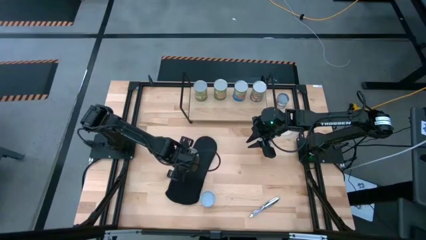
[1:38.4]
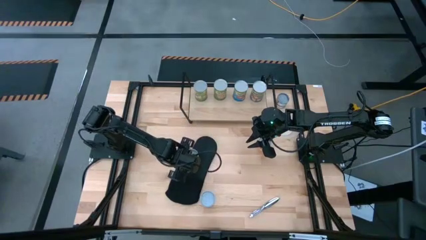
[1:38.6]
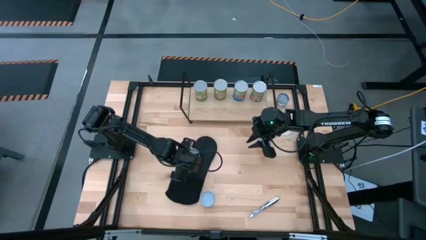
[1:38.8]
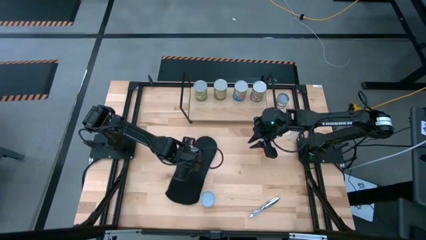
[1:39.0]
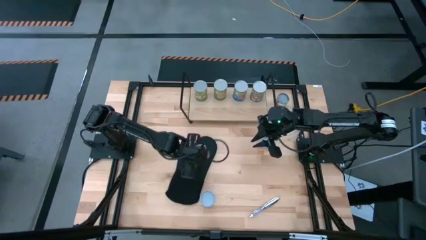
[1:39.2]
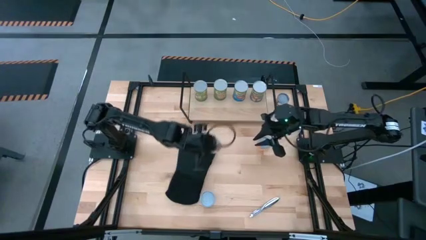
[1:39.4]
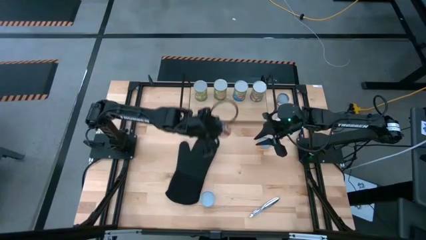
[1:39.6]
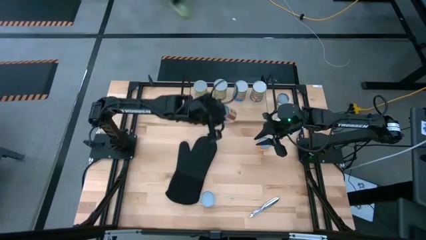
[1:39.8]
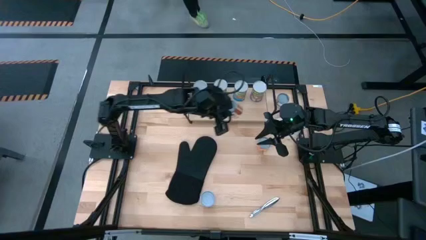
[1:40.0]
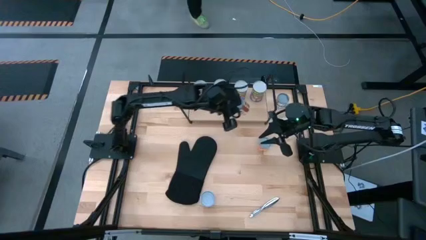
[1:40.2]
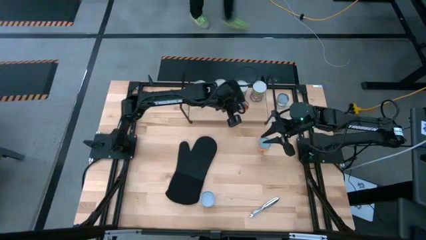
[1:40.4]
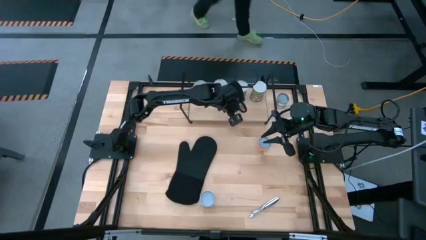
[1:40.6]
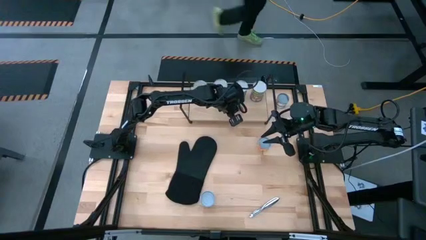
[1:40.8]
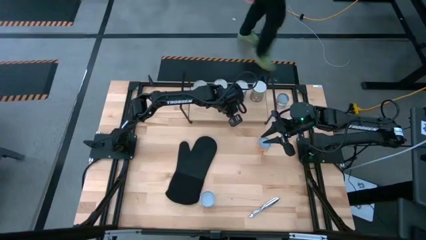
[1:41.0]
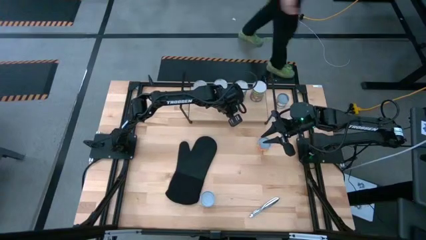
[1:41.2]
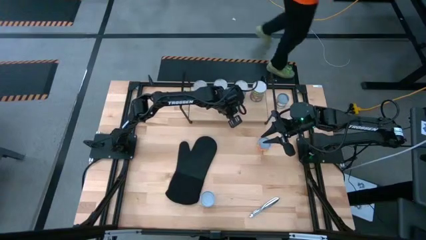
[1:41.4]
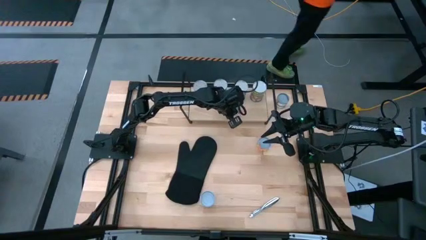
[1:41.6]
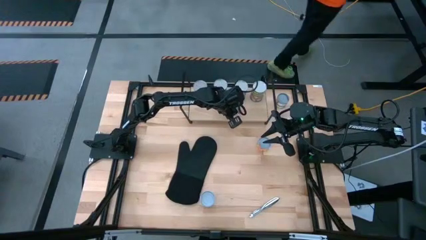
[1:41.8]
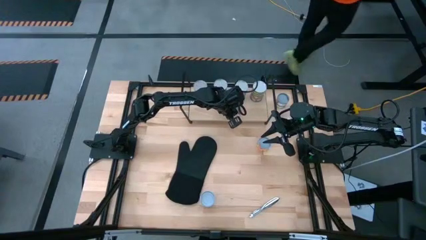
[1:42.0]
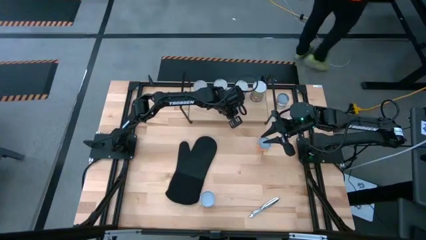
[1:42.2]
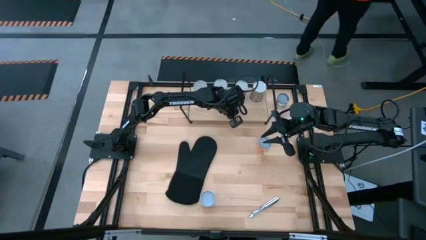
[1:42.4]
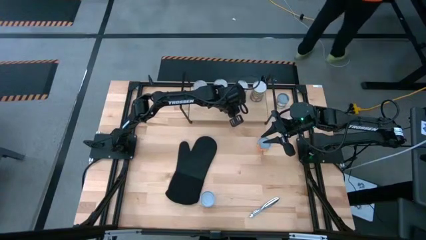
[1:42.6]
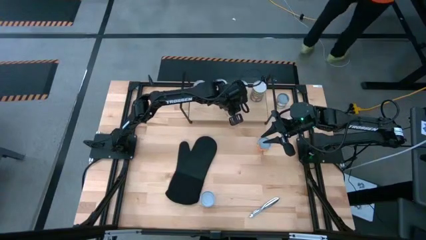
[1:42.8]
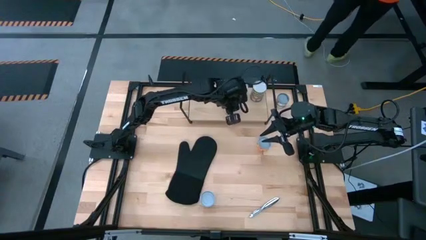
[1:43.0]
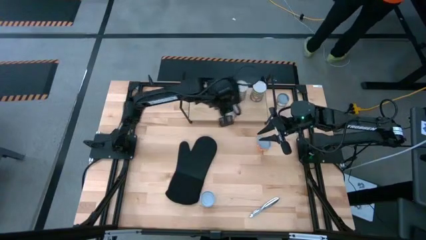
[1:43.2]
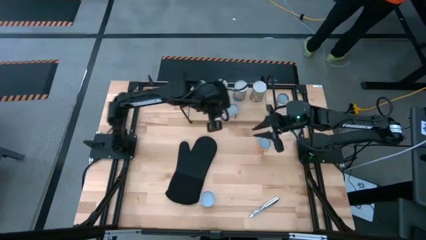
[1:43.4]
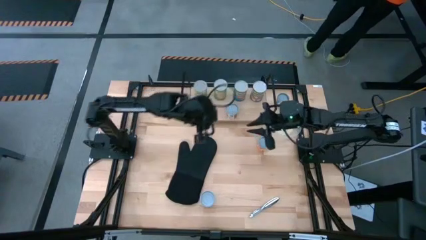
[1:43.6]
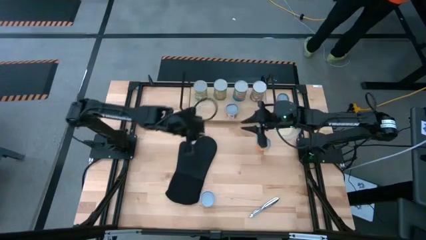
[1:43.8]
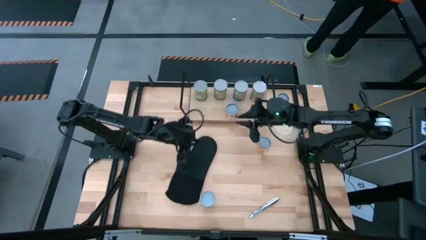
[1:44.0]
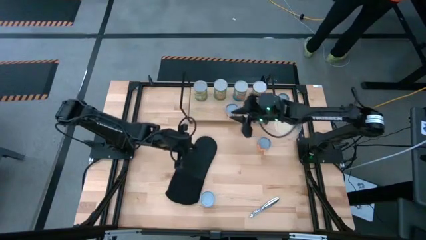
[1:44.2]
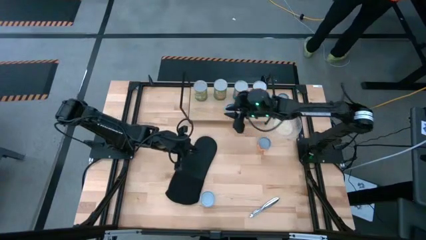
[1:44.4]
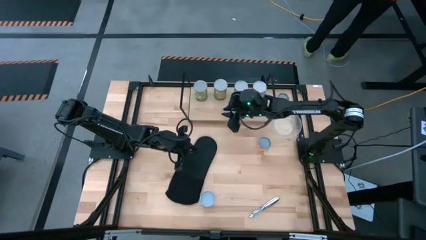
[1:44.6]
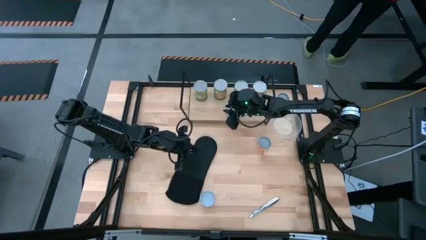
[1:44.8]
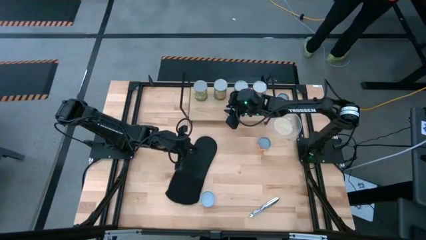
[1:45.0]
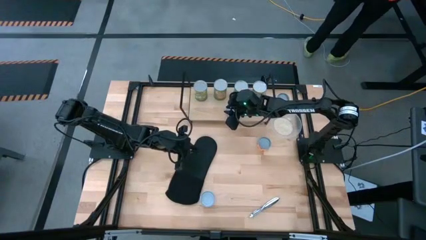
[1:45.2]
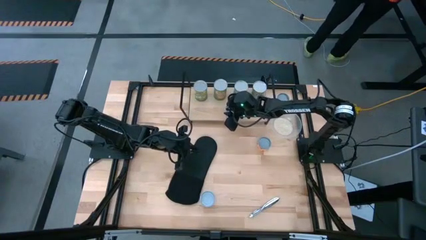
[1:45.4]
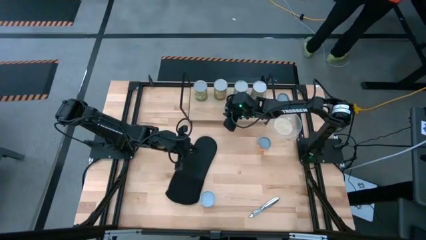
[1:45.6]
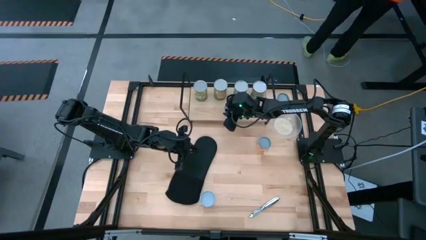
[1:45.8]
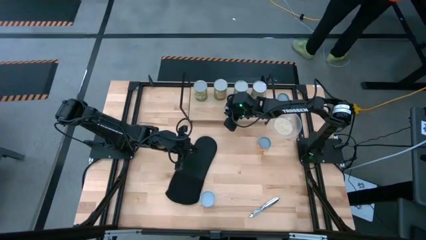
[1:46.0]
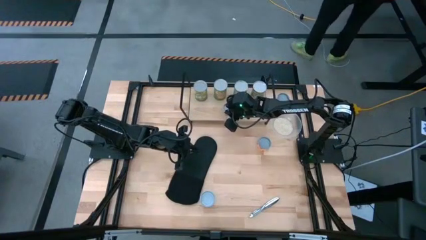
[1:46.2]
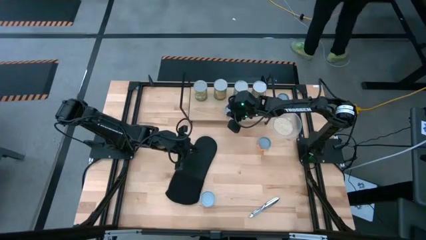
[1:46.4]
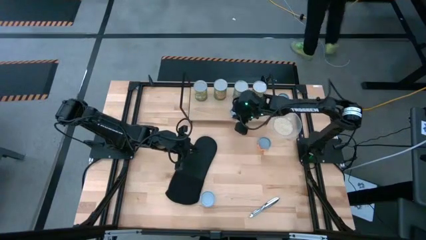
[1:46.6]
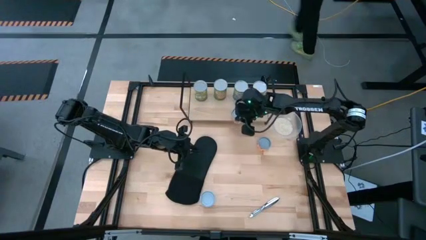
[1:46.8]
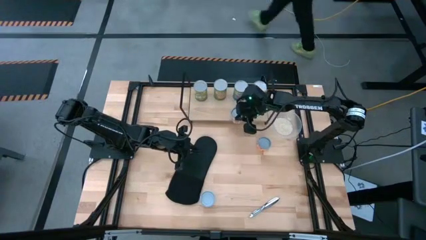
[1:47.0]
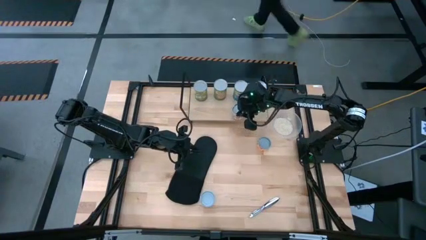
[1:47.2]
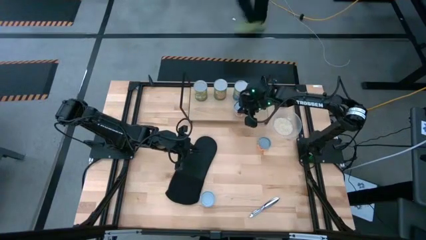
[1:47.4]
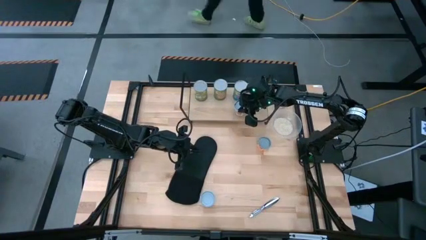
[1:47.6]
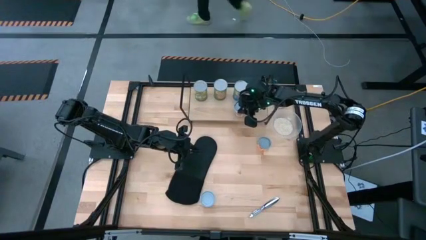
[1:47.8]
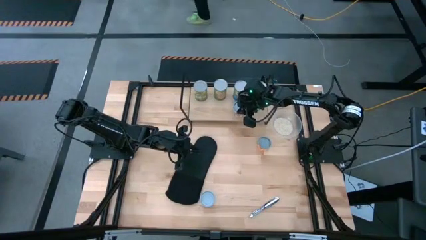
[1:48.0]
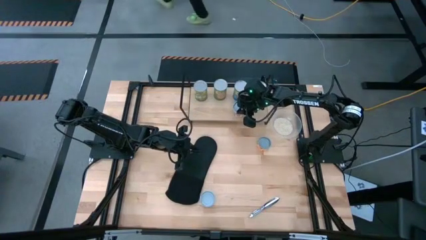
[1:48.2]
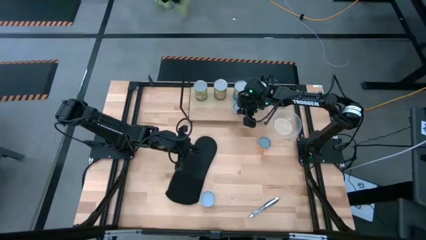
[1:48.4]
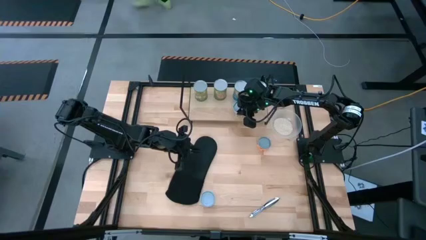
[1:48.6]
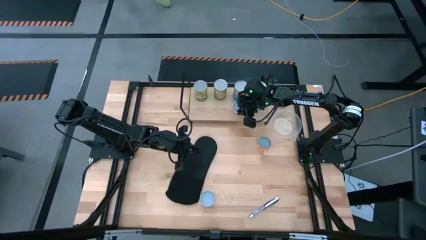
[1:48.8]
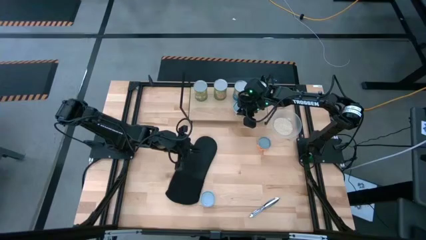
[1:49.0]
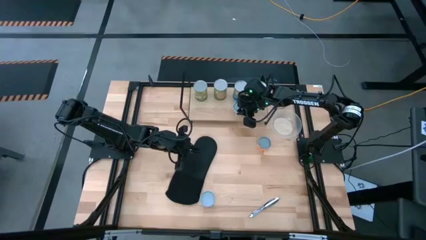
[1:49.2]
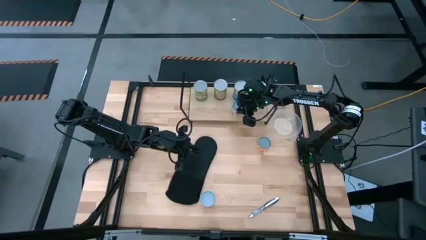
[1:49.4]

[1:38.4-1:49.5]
Task: Pick and place cans onto a shelf
Put the small canned tomatoes on the shelf
